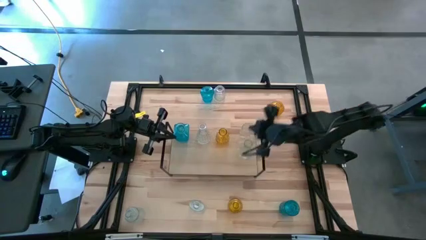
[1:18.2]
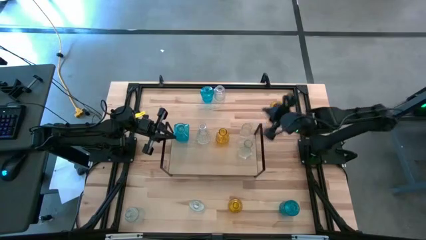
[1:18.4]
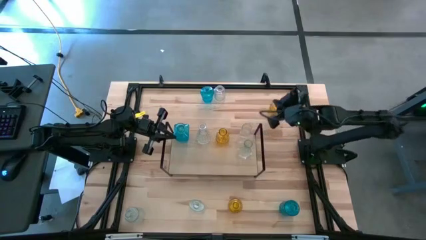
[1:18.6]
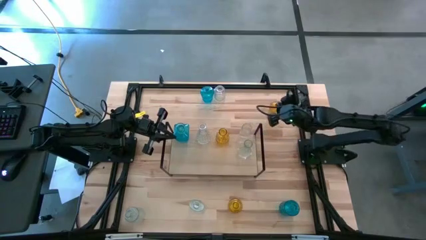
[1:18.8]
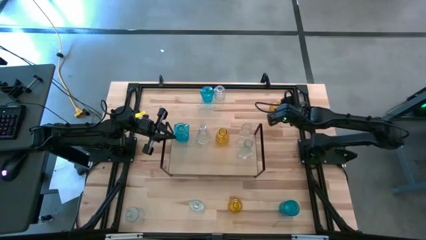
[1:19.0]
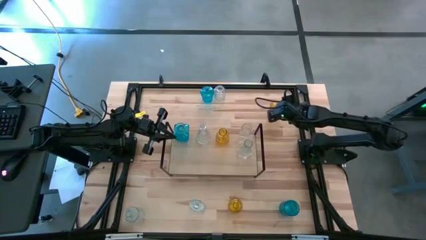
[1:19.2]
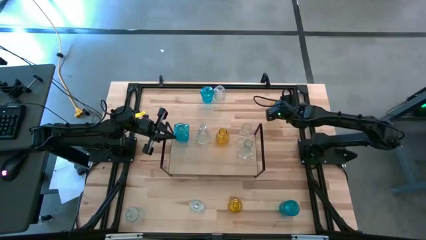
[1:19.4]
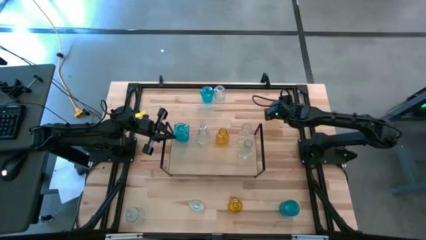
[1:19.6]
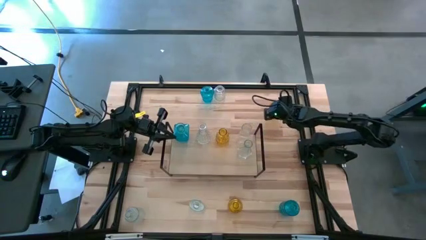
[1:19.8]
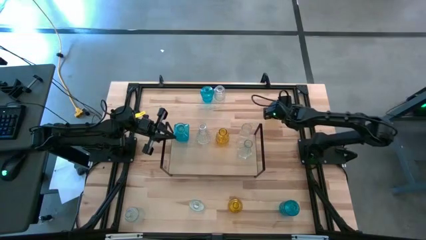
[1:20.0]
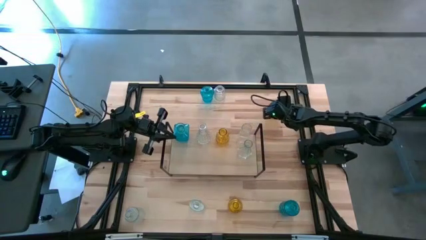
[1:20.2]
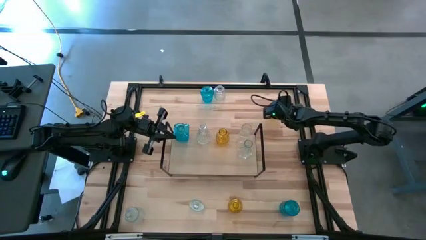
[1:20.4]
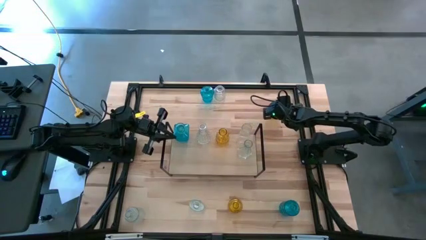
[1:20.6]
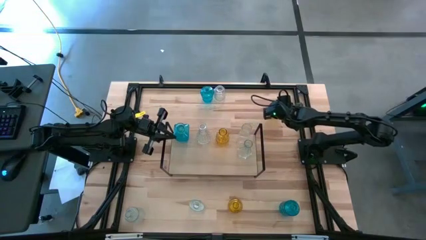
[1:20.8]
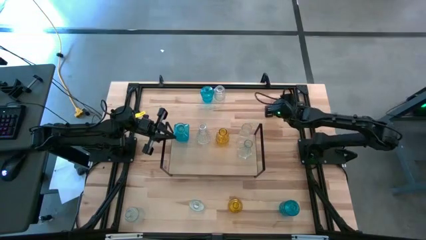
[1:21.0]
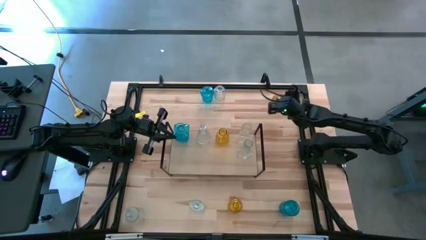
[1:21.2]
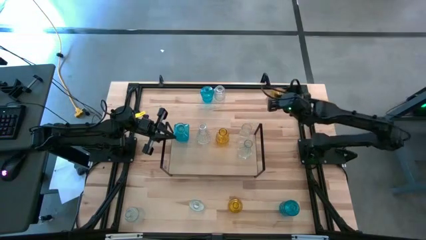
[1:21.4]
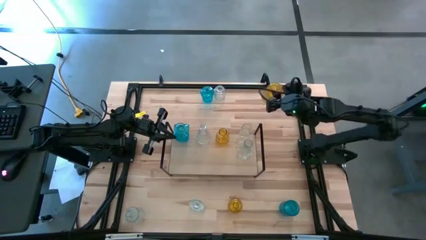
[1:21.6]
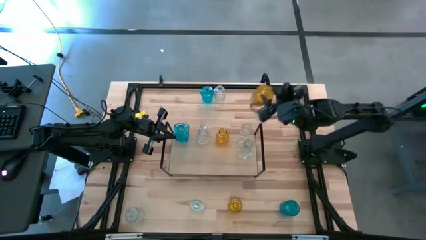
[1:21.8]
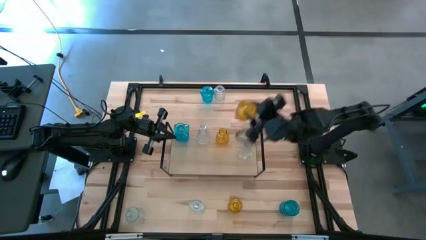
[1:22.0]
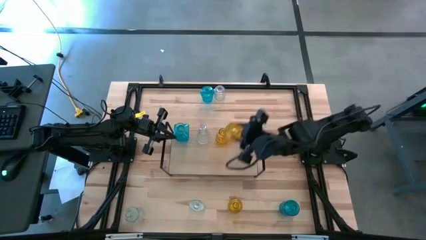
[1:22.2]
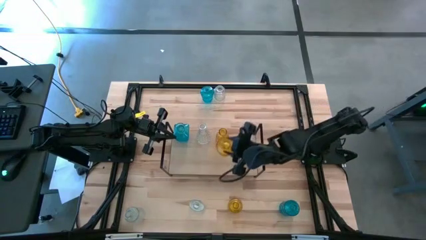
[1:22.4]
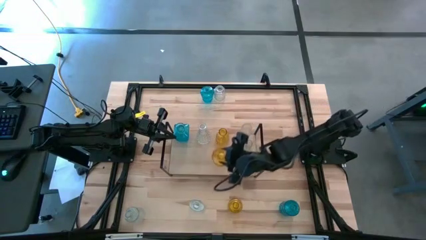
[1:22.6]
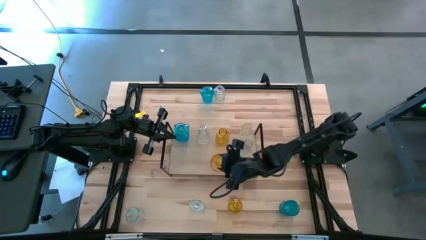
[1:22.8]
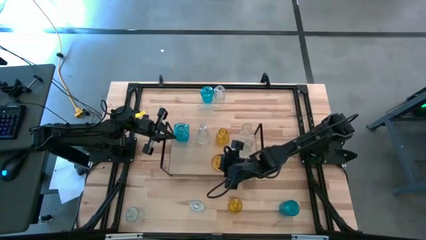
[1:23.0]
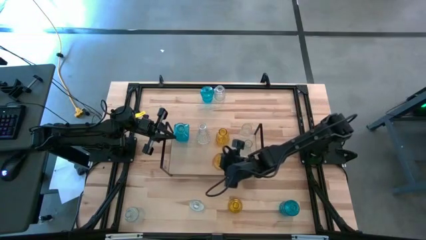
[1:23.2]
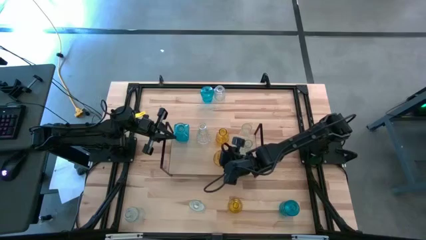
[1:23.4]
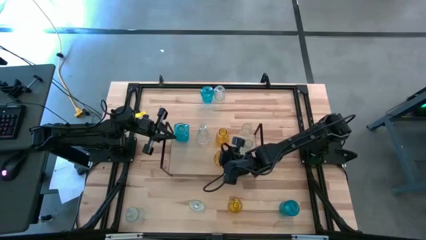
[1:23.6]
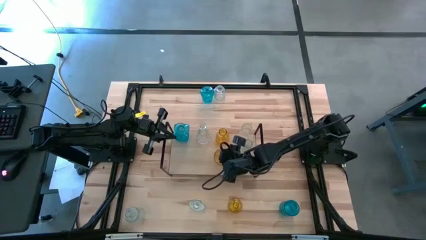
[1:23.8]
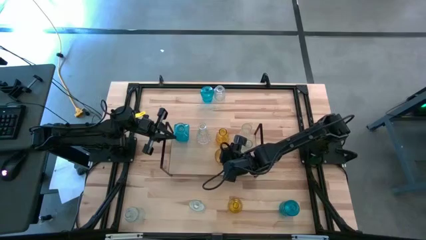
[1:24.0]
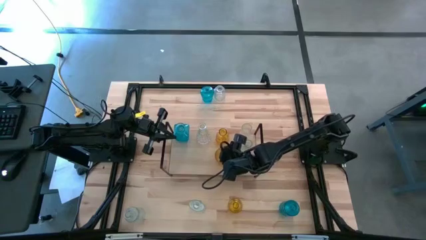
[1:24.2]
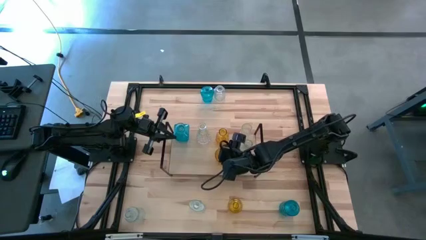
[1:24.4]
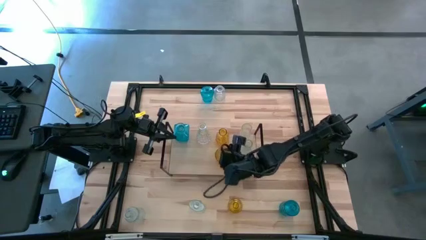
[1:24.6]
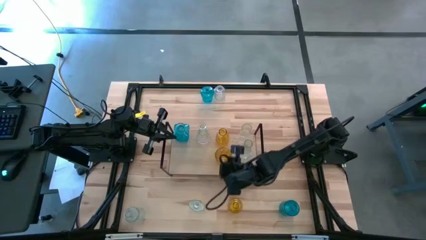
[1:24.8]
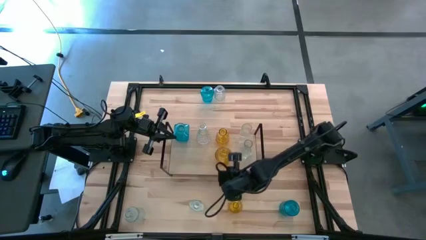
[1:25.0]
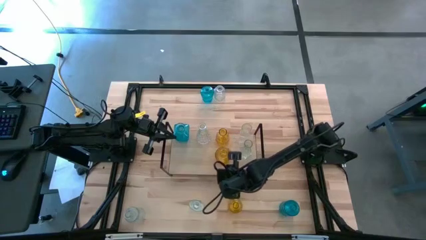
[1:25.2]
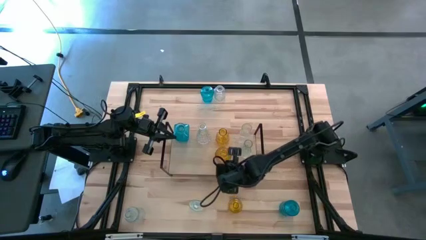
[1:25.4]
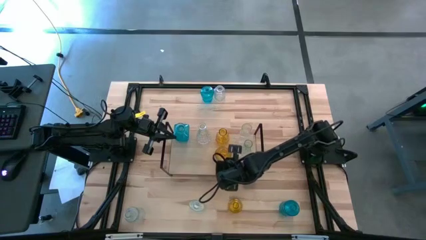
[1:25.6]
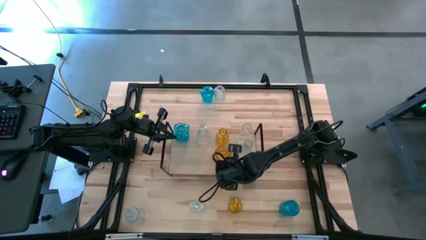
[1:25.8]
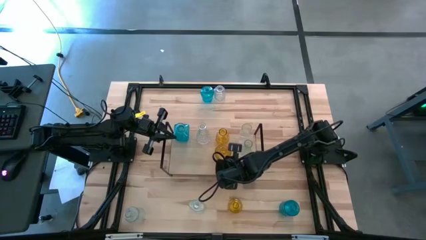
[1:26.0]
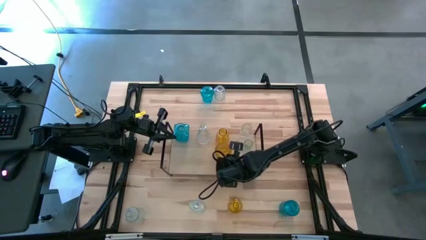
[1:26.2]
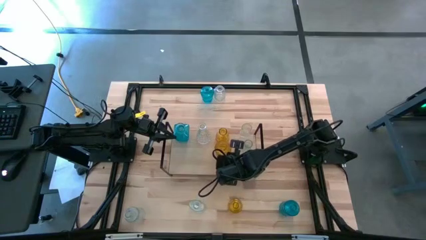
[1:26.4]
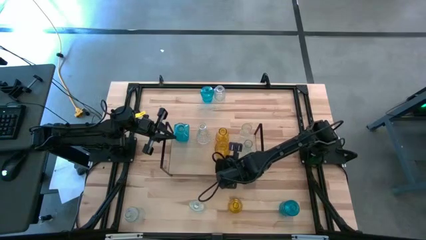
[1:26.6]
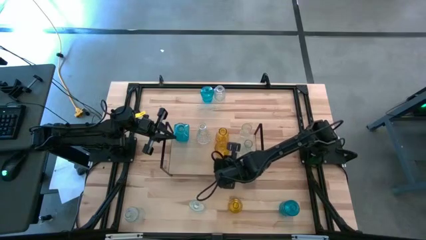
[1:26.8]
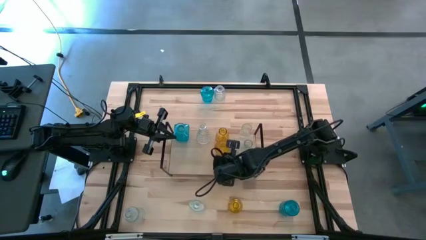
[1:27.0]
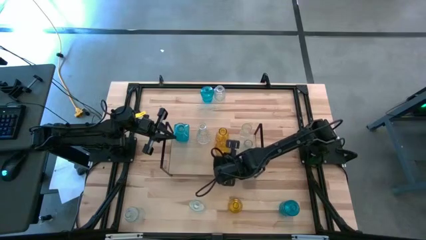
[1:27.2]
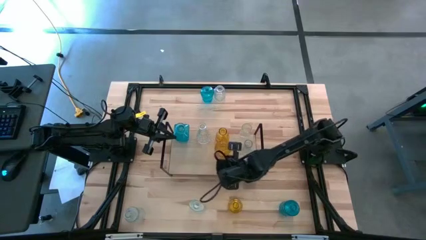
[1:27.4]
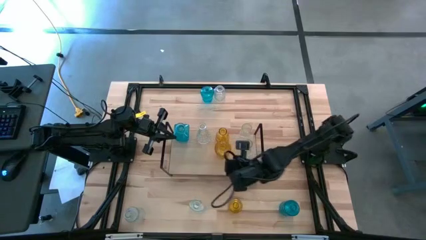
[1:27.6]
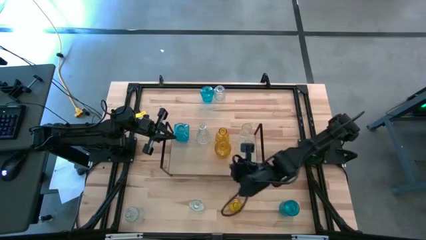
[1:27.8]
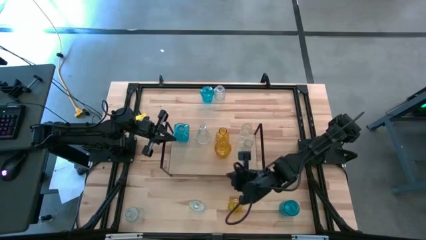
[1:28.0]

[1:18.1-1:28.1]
Task: sort vases onto shelf
Put the top right yellow vase on the shelf

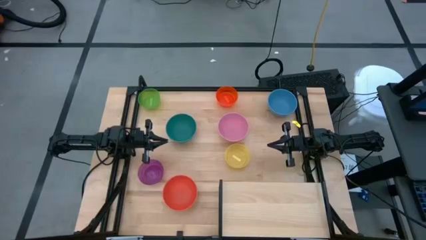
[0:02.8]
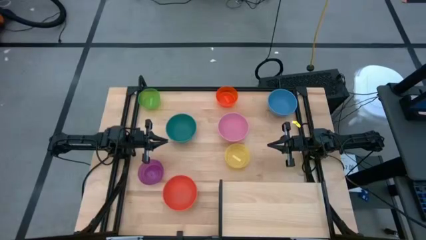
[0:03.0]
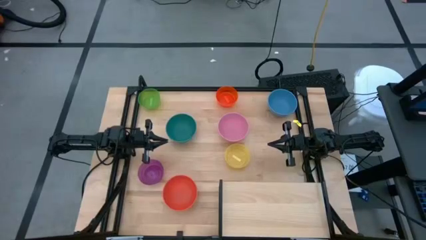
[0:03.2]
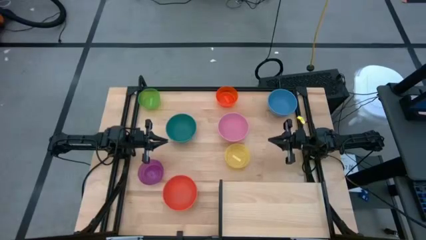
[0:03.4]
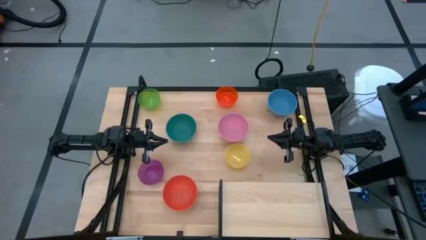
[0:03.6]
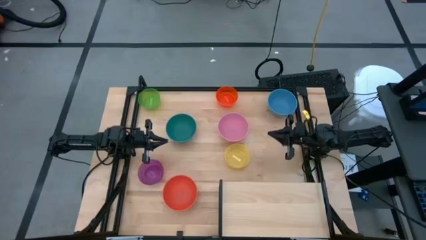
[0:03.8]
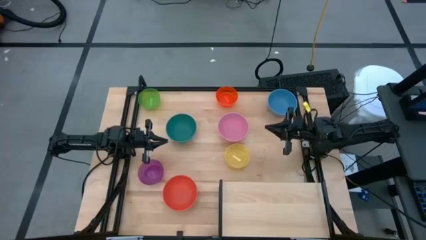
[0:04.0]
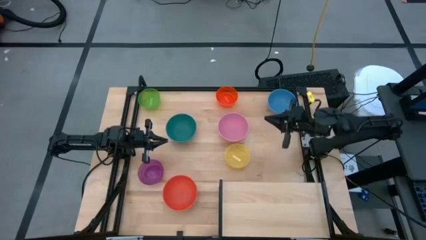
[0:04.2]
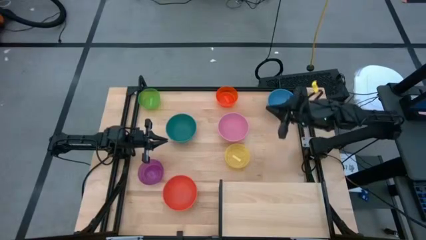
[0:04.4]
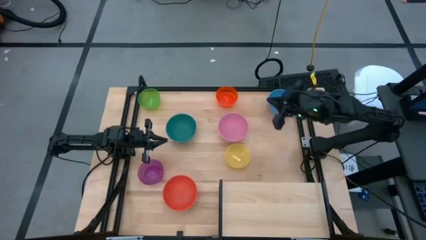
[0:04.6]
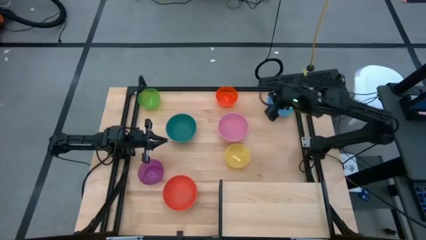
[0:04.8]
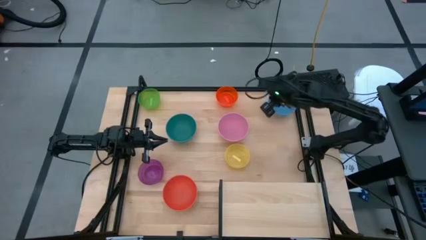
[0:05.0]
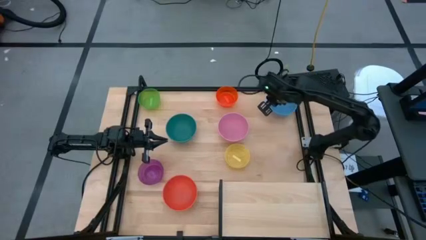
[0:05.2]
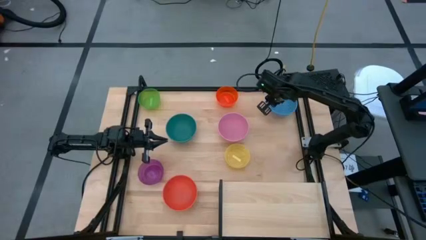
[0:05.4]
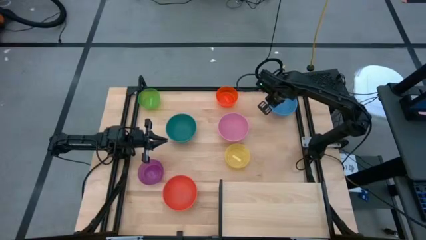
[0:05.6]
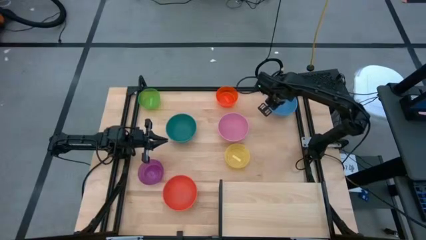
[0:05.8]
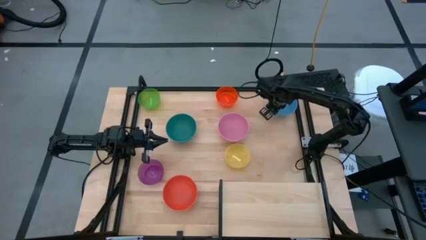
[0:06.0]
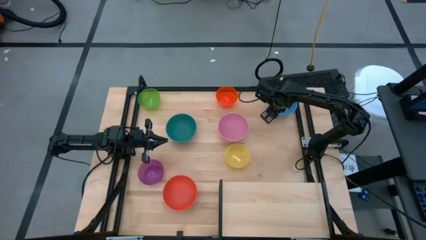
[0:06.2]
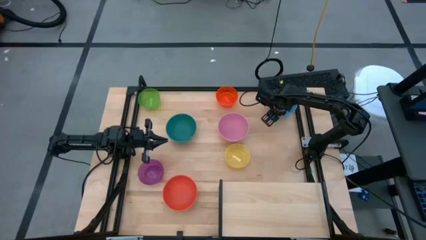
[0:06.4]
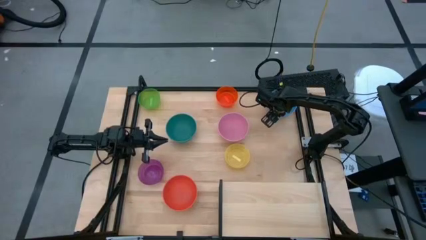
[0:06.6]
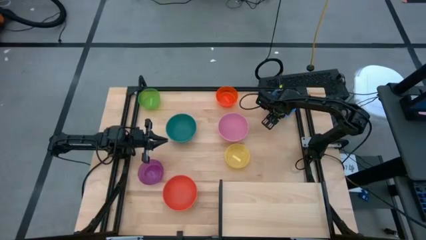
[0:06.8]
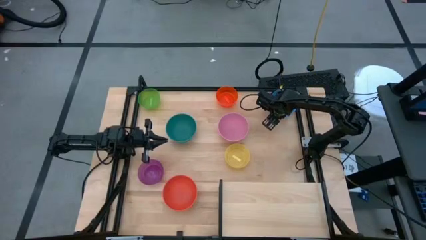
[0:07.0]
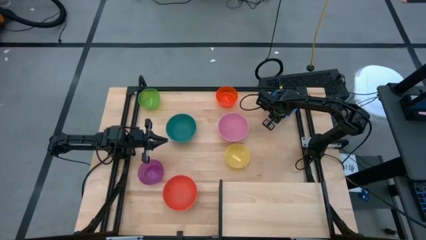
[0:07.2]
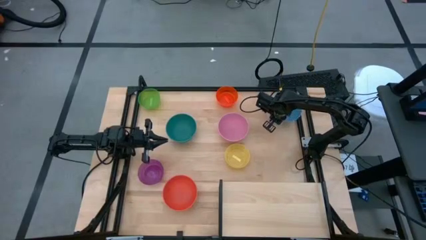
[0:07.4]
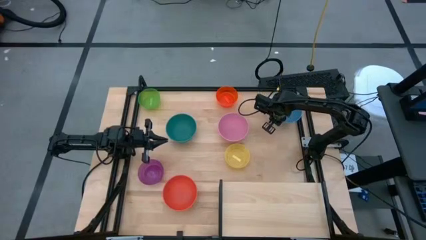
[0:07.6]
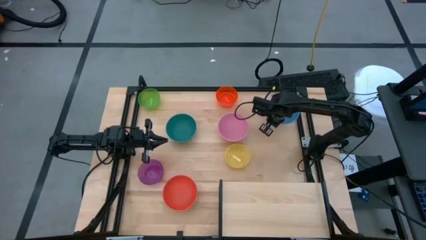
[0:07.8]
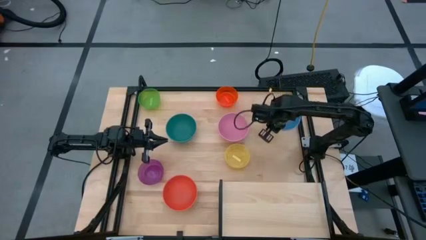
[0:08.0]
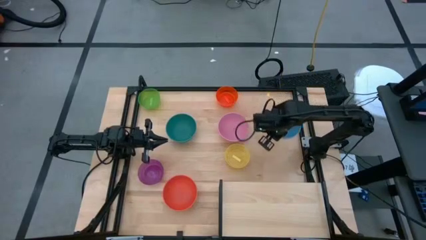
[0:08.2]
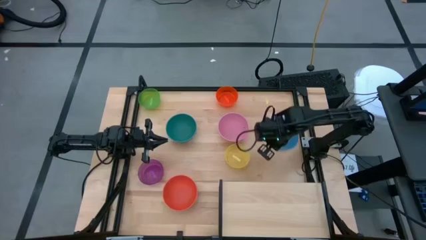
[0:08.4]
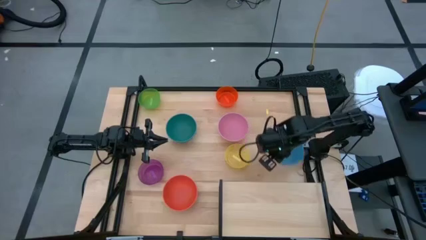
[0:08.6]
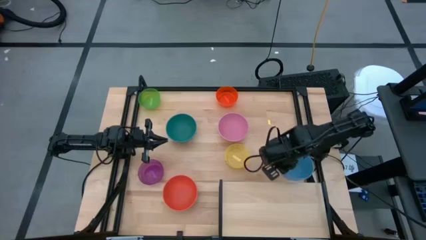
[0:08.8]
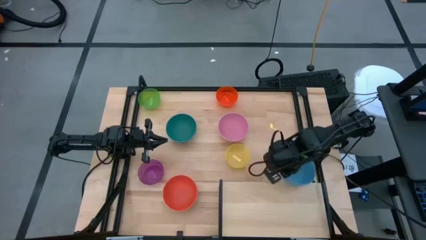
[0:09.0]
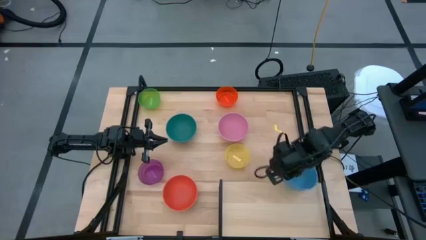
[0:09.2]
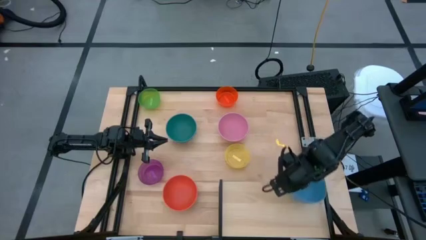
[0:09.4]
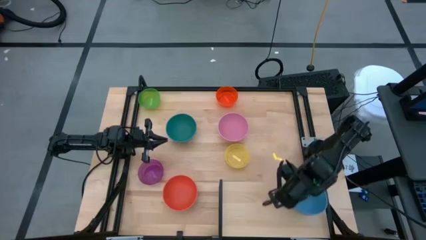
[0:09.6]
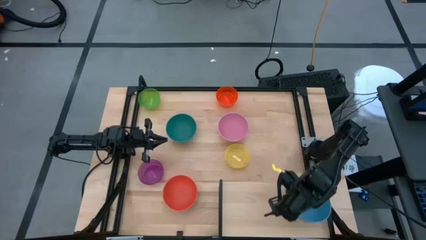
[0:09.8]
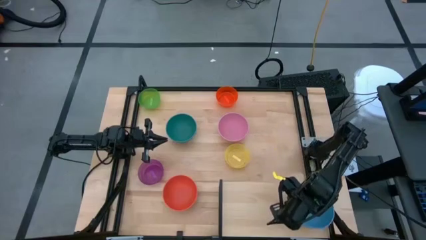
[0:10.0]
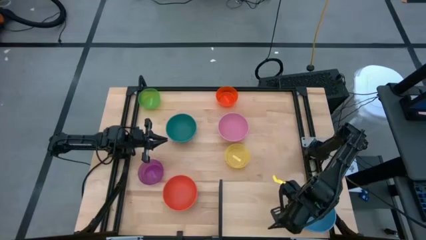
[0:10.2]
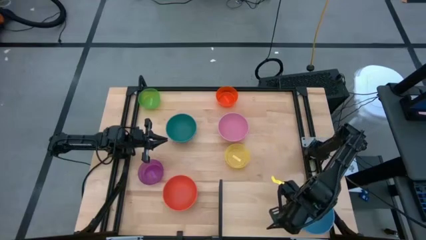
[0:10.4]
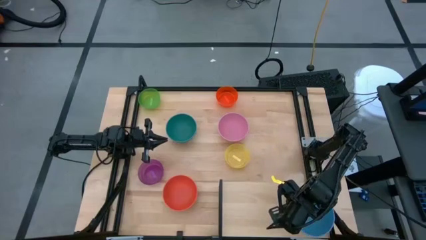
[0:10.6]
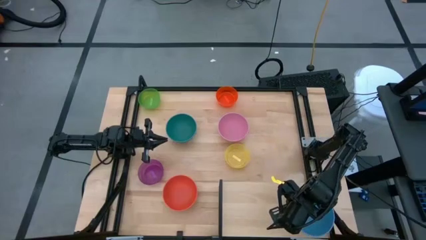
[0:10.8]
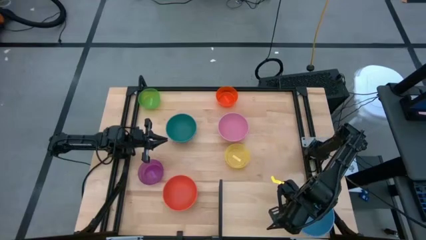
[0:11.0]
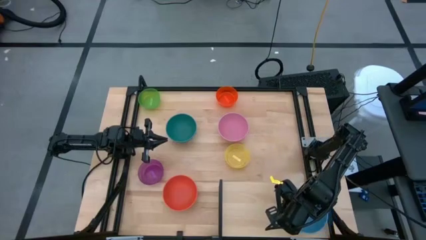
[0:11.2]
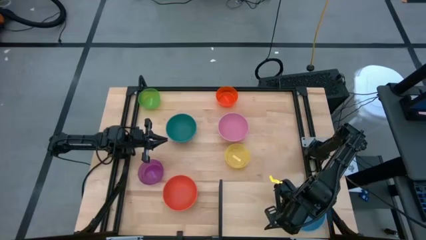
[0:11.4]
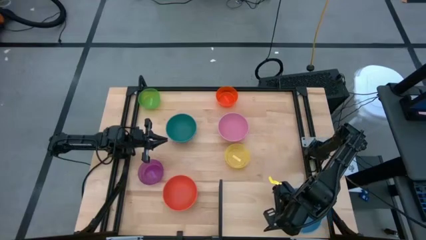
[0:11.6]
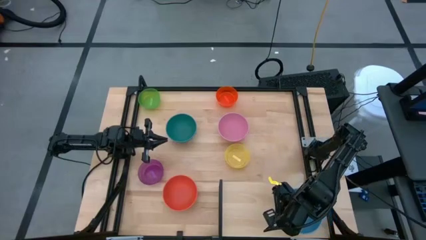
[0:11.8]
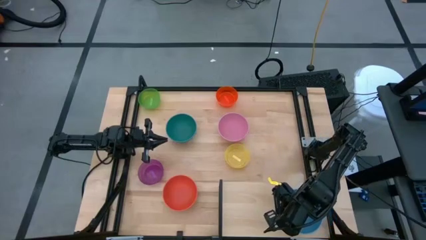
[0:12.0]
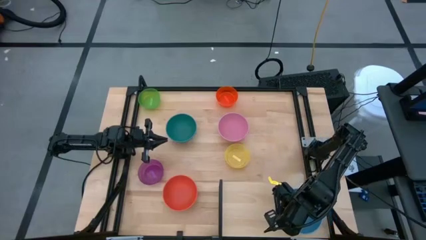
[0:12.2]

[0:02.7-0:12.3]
Task: Place and stack bowls onto a shelf
Put the blue bowl on the shelf
